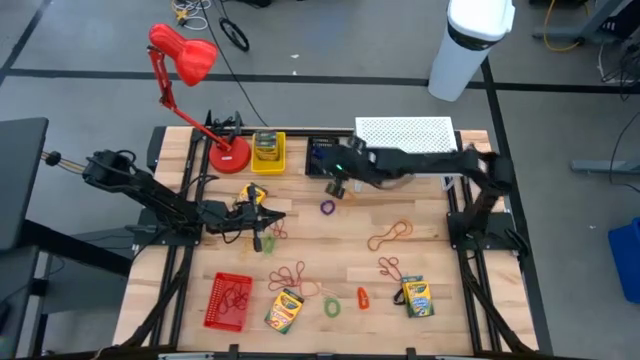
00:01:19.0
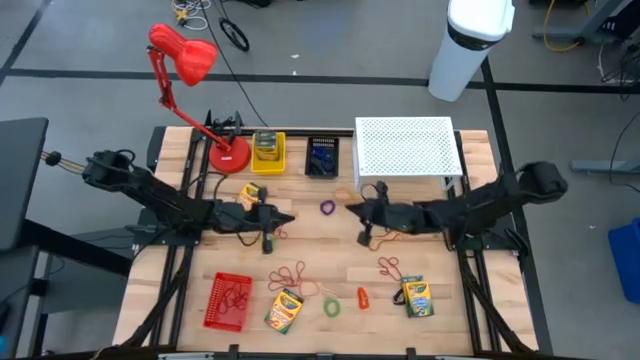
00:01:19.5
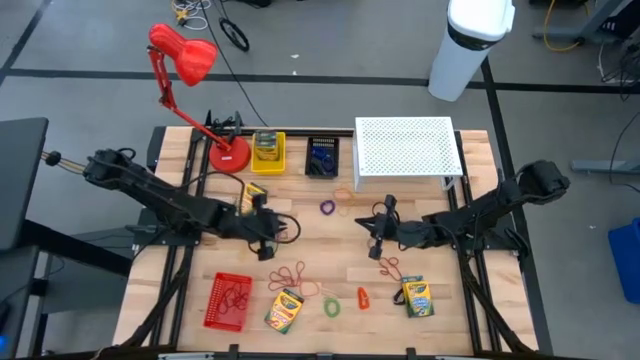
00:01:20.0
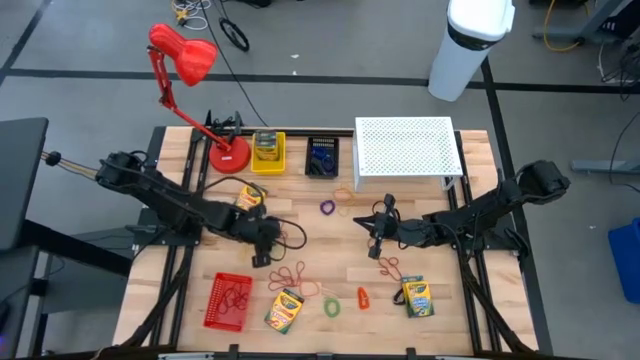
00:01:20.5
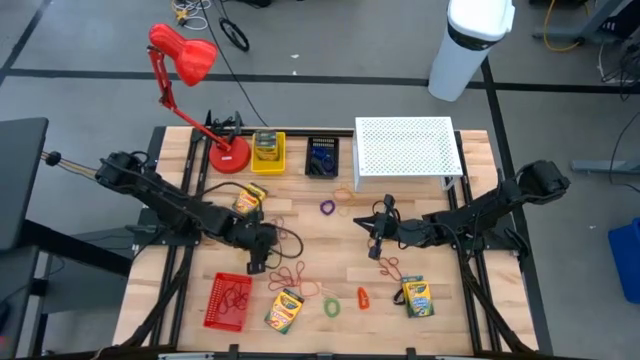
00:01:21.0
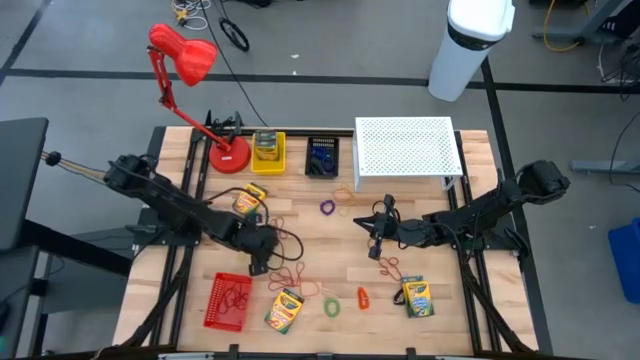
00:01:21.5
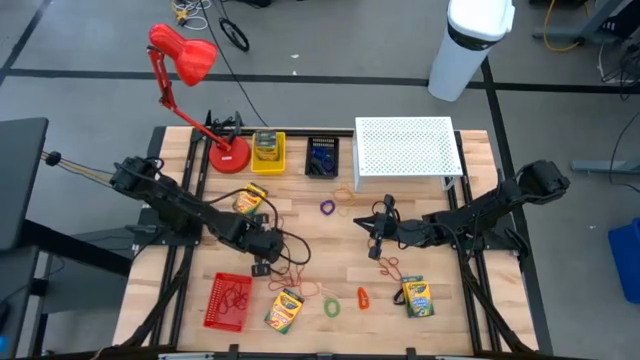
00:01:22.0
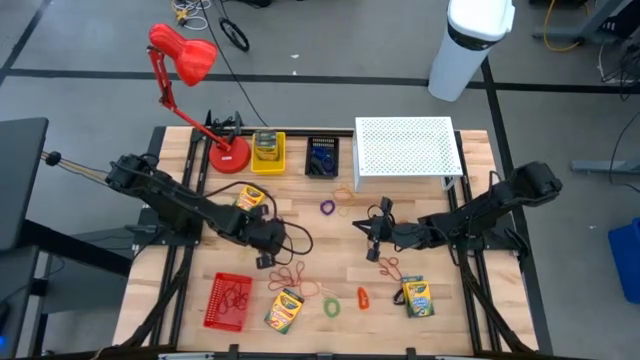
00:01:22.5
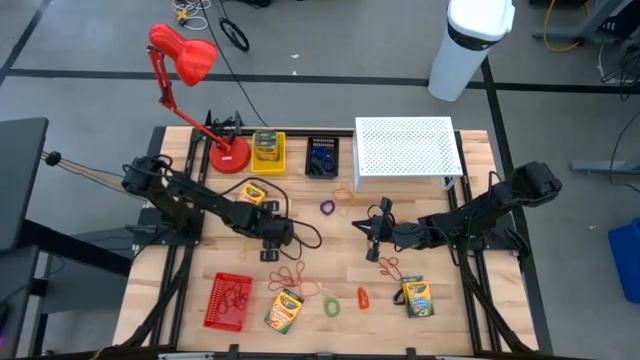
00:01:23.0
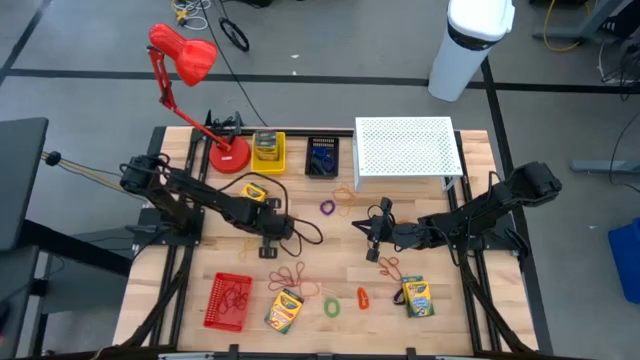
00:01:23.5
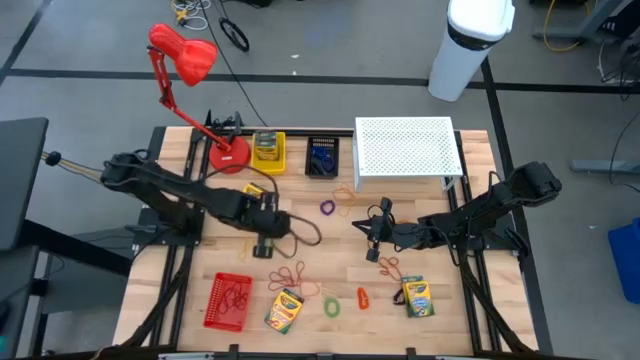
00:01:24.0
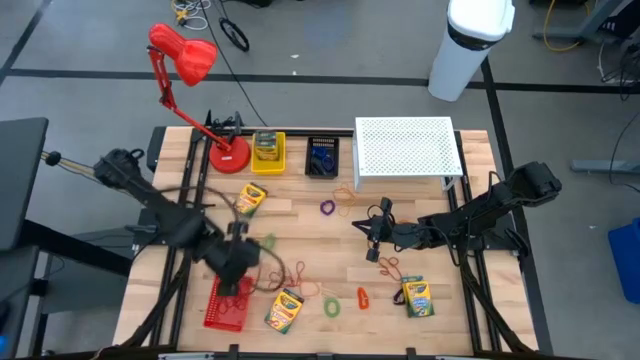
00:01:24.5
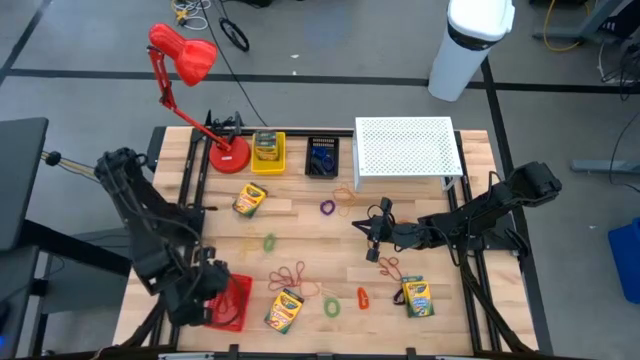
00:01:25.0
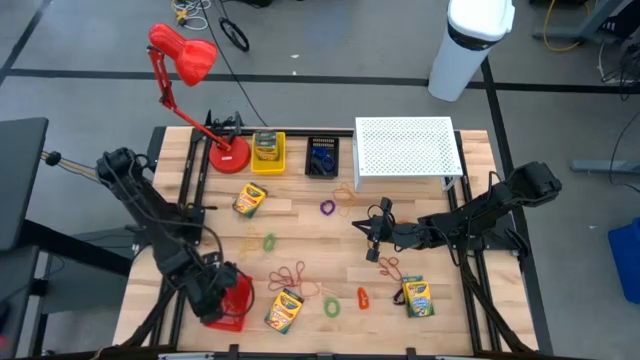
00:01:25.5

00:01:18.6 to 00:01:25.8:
Task: Pick & Place Office Desk Supplies
Put the red rubber band into the red bin

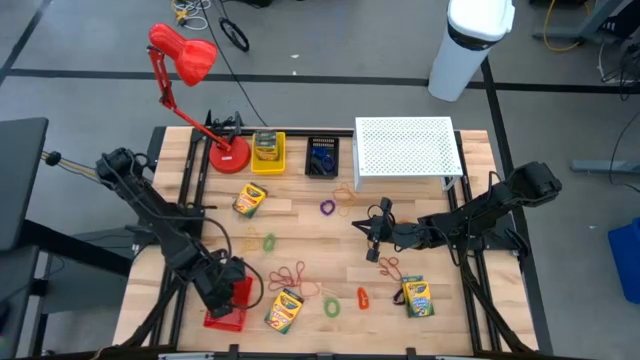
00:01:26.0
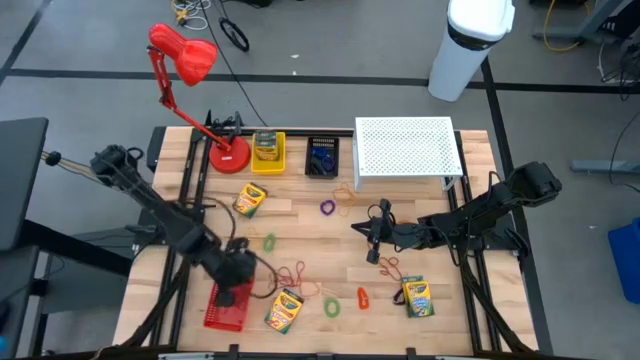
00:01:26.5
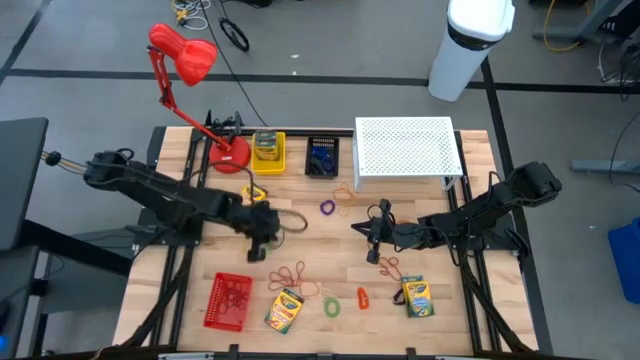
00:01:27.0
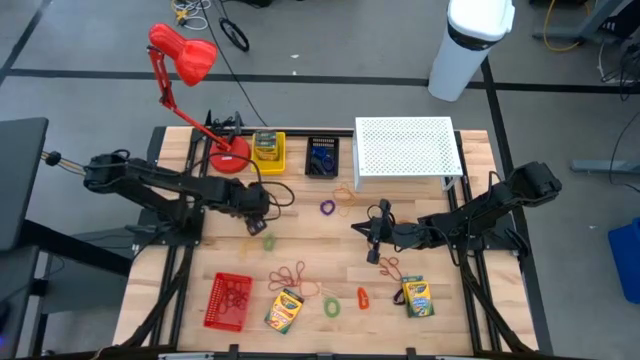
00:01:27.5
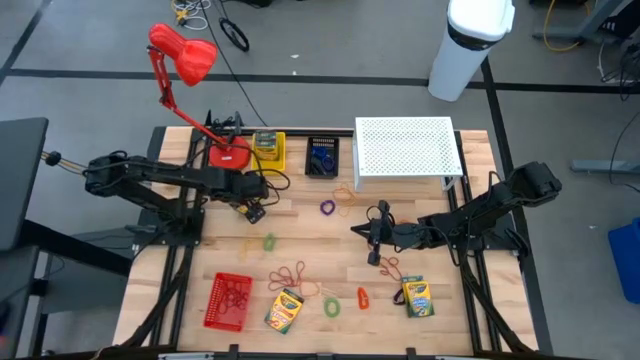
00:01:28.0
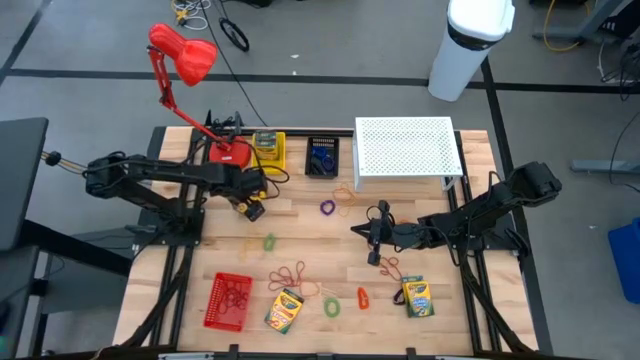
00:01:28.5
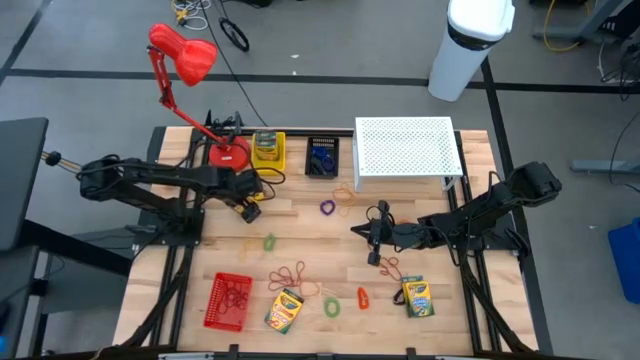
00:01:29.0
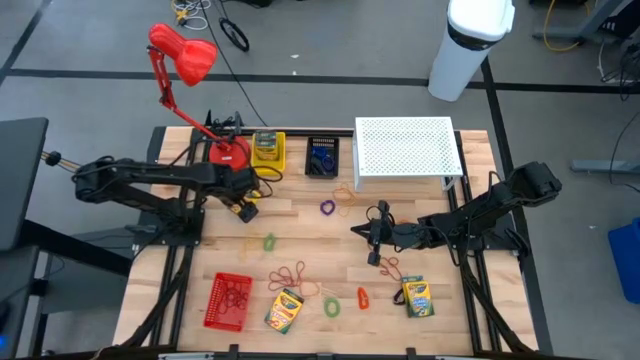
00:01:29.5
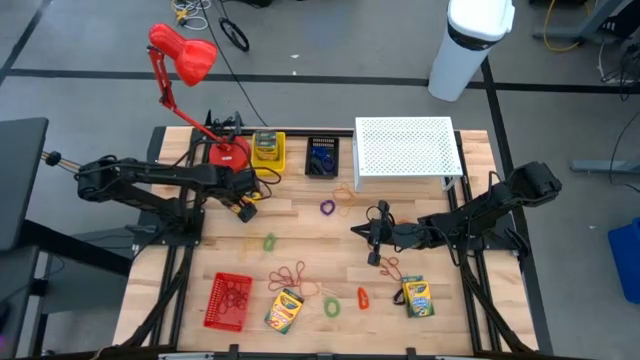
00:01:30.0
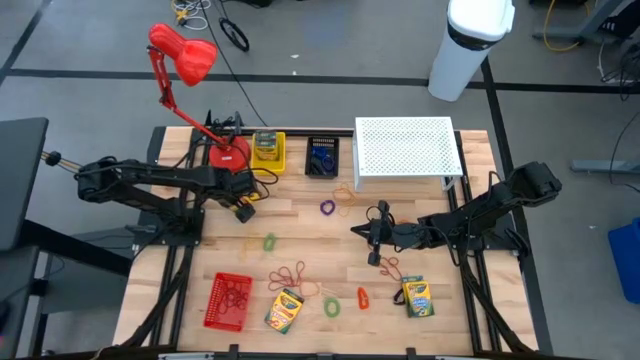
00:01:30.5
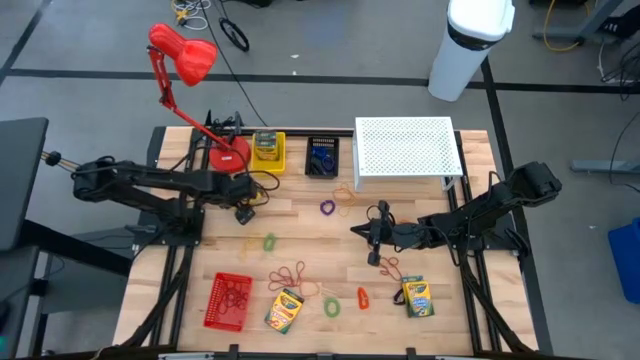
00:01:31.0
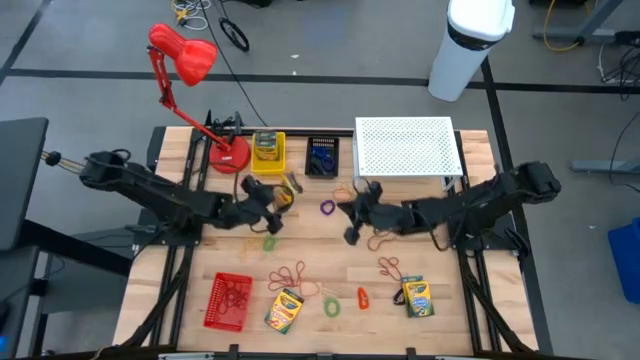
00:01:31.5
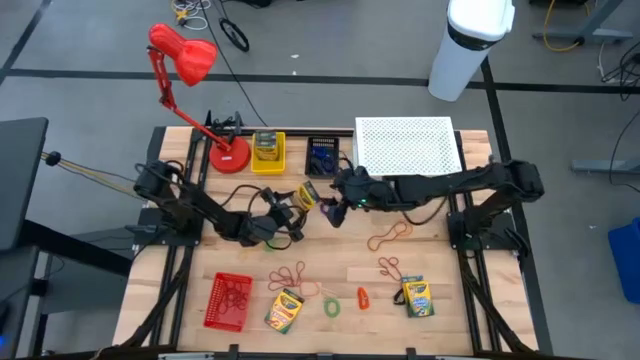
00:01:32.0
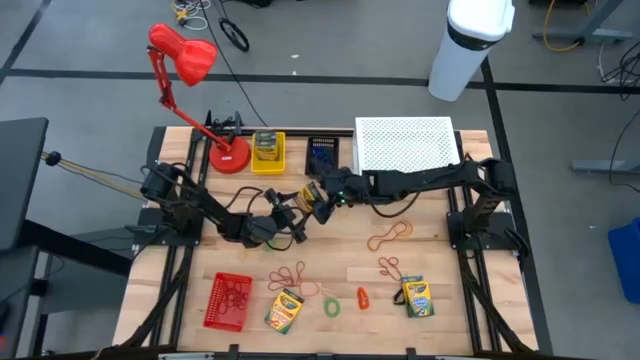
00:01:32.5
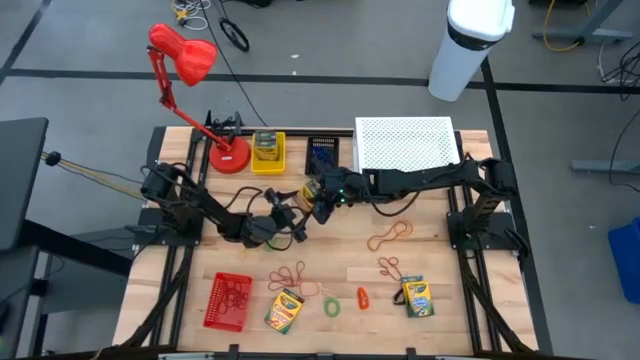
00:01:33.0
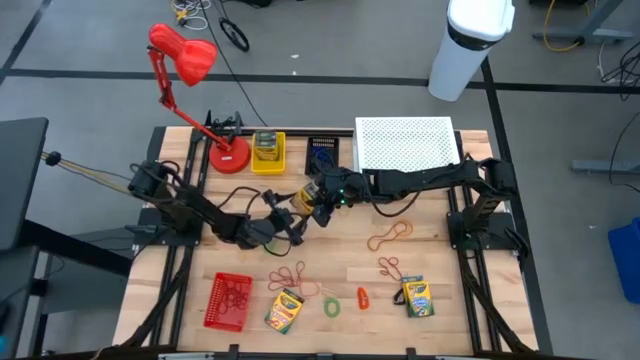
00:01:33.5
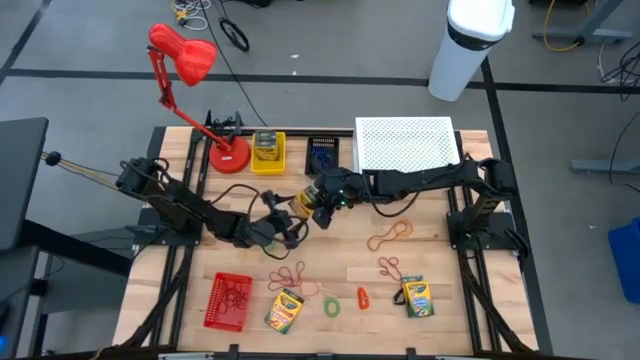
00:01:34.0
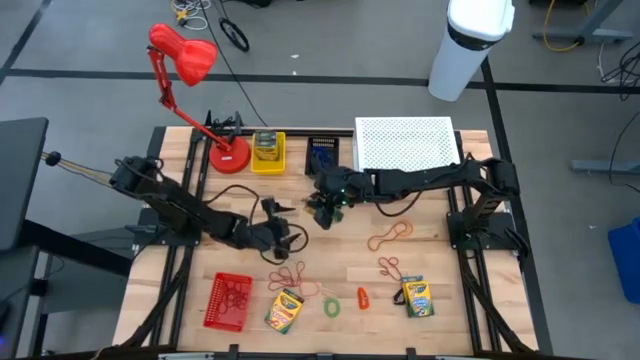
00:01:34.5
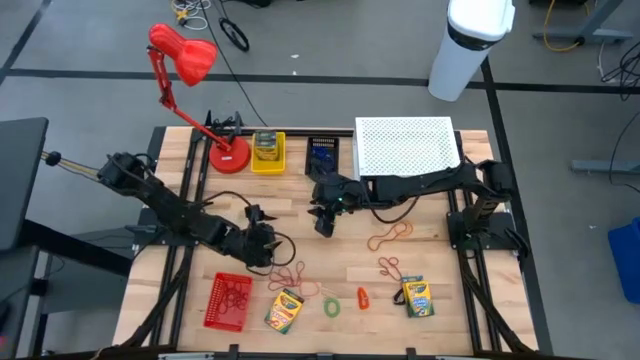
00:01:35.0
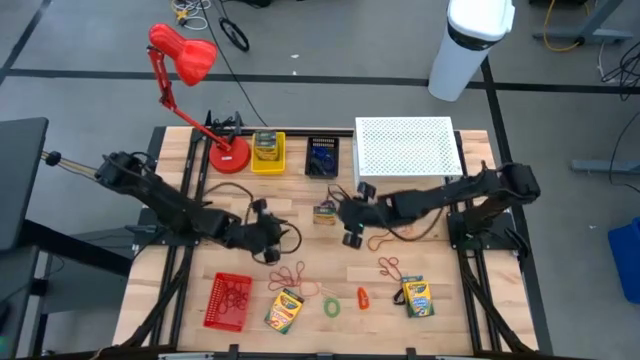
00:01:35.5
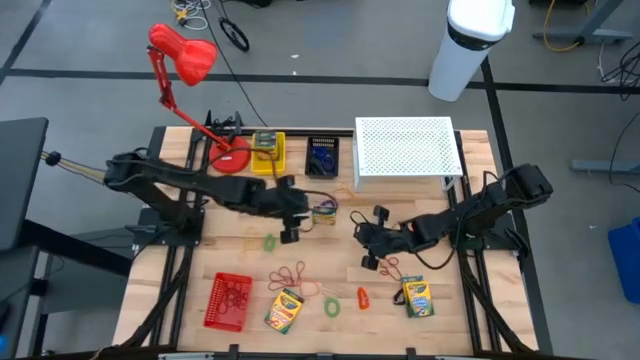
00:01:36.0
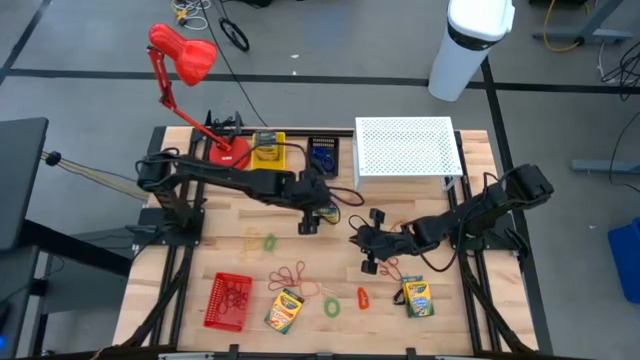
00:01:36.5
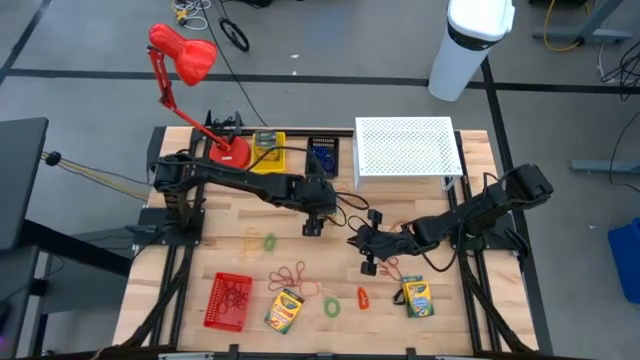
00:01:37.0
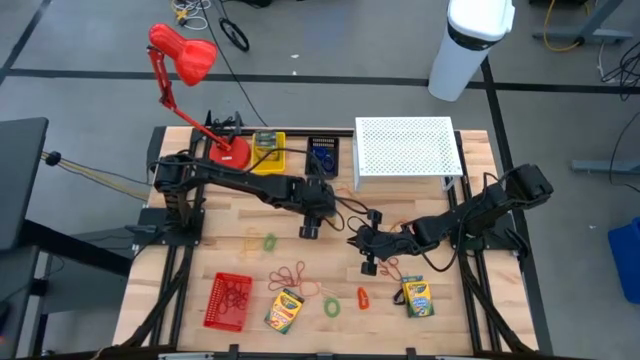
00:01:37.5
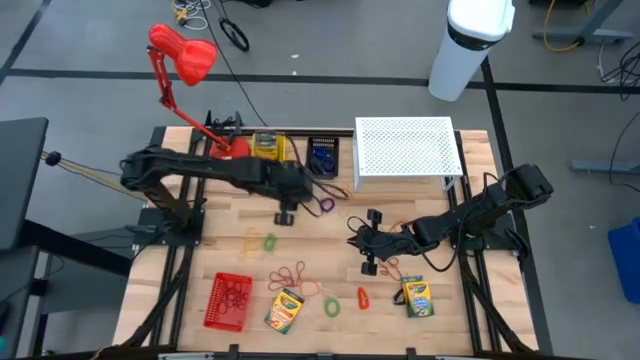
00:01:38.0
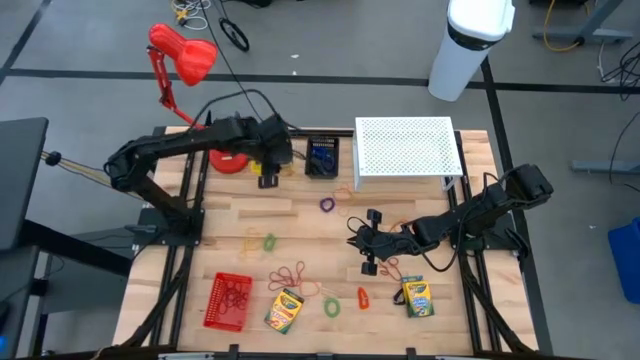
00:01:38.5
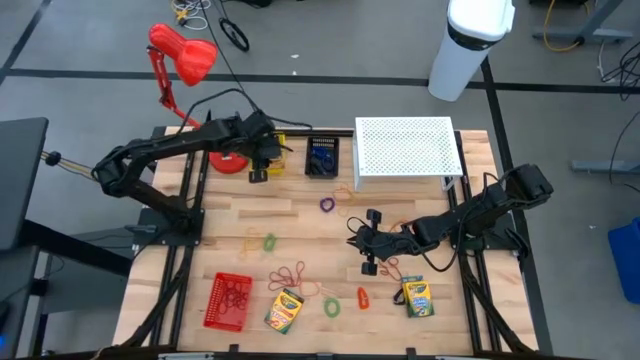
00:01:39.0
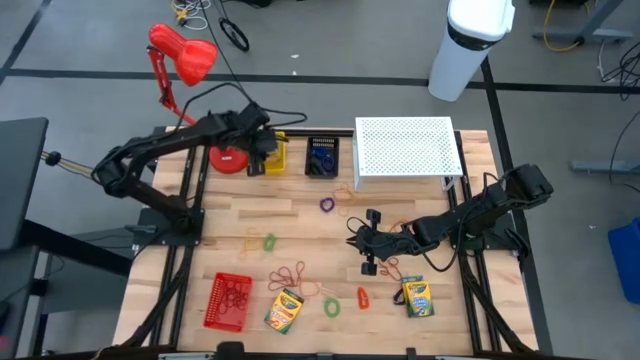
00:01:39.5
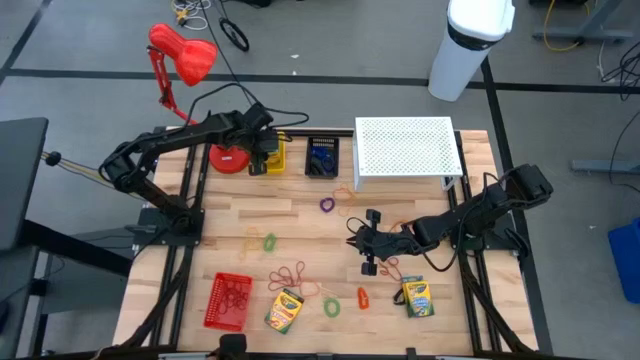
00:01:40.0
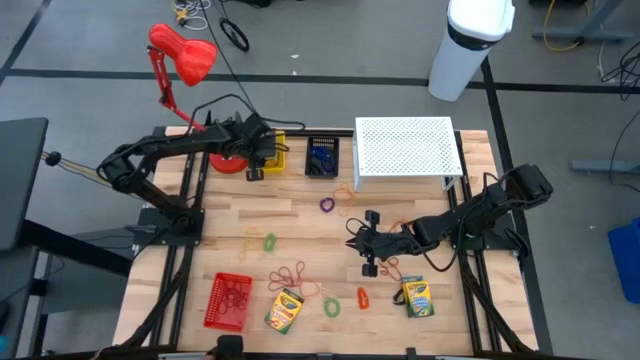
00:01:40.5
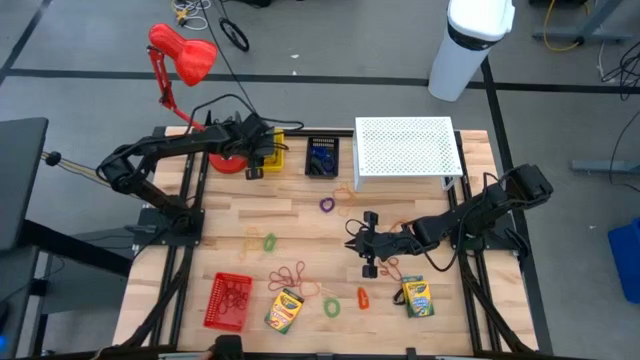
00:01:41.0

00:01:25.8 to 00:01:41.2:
Put the top left yellow crayon box into the yellow bin
